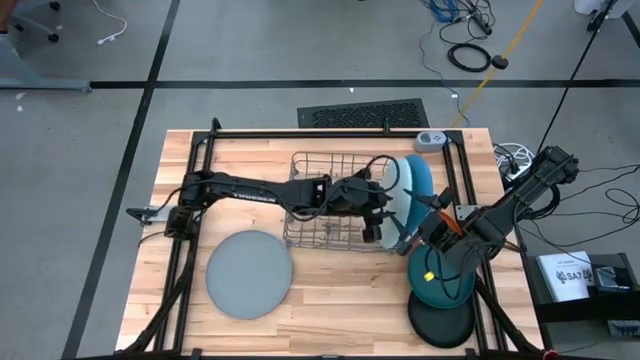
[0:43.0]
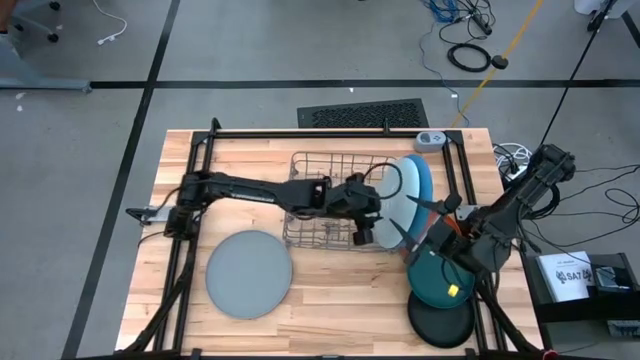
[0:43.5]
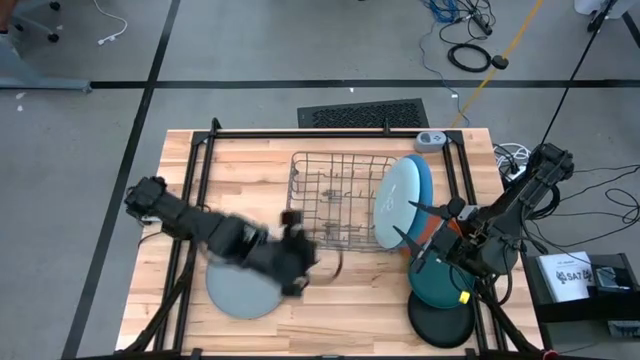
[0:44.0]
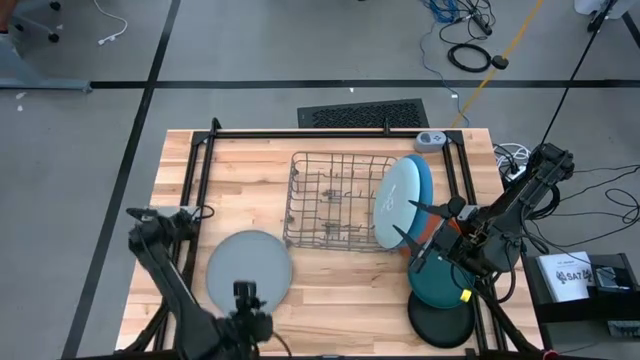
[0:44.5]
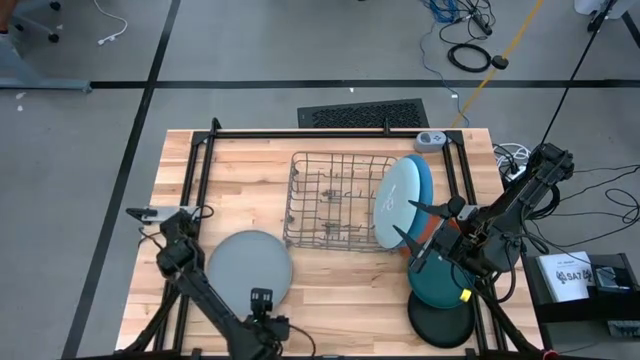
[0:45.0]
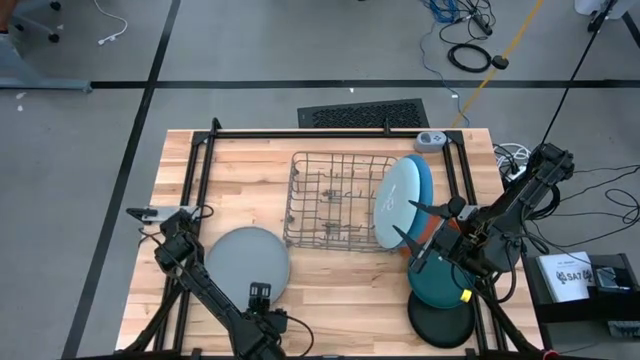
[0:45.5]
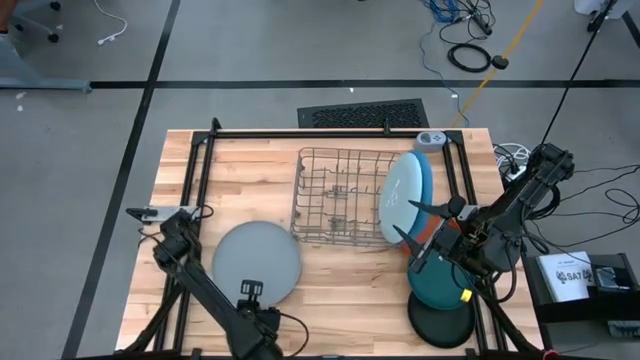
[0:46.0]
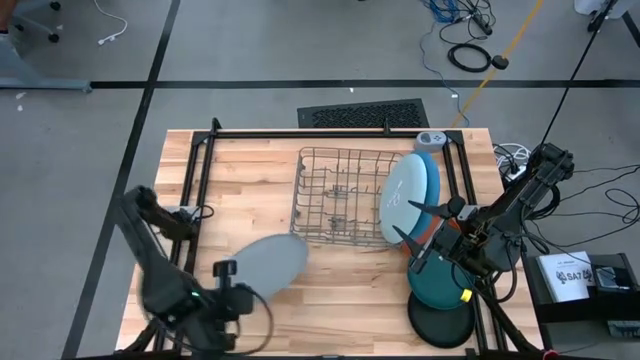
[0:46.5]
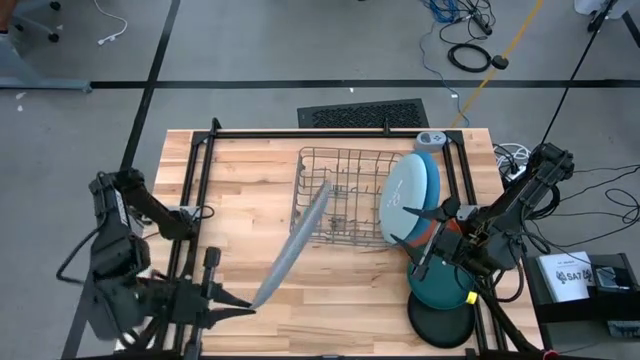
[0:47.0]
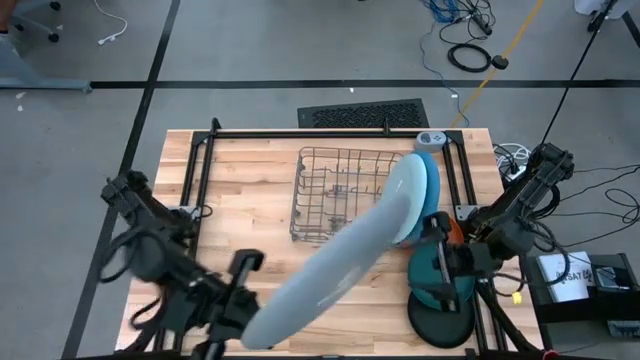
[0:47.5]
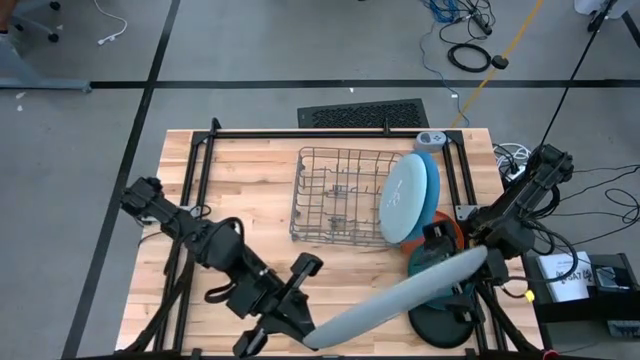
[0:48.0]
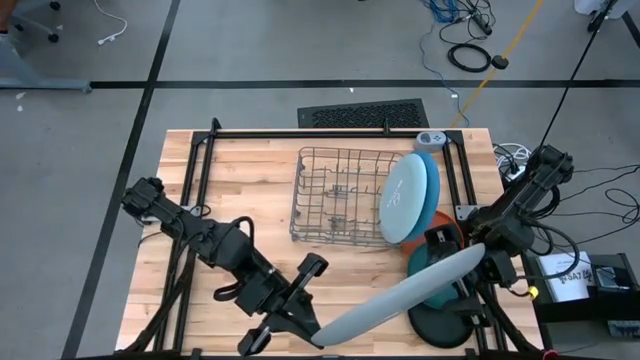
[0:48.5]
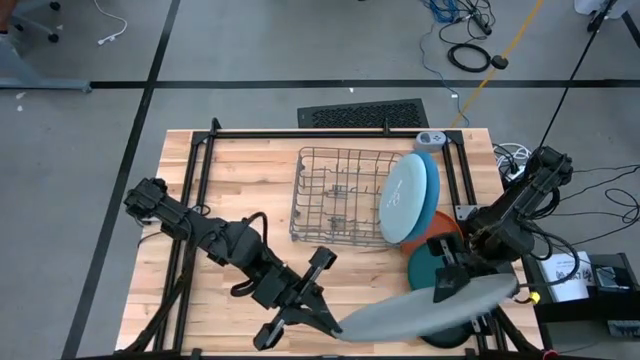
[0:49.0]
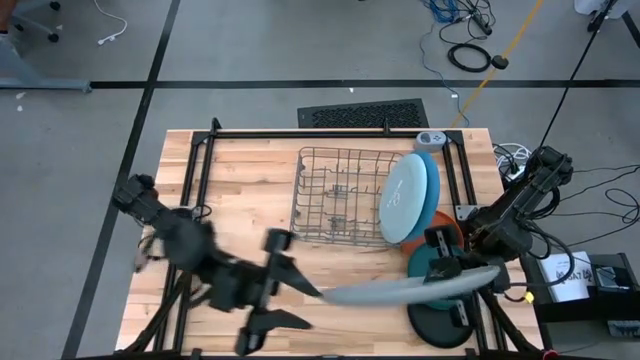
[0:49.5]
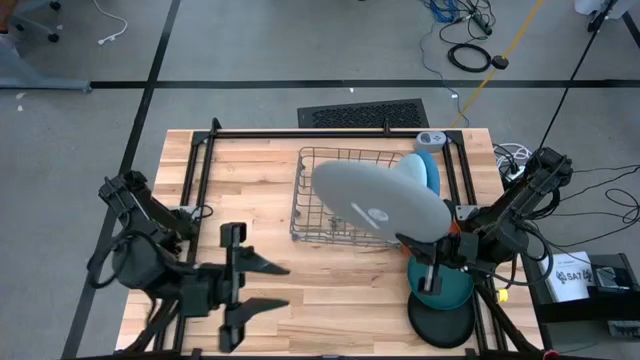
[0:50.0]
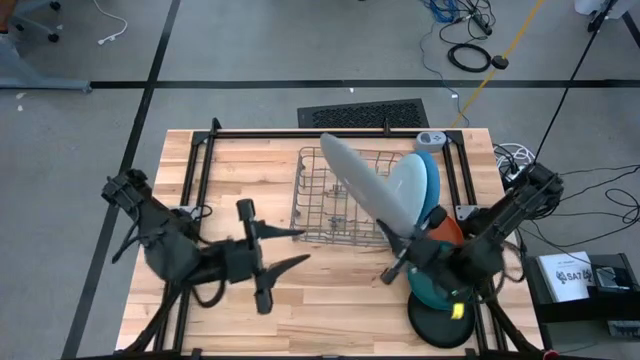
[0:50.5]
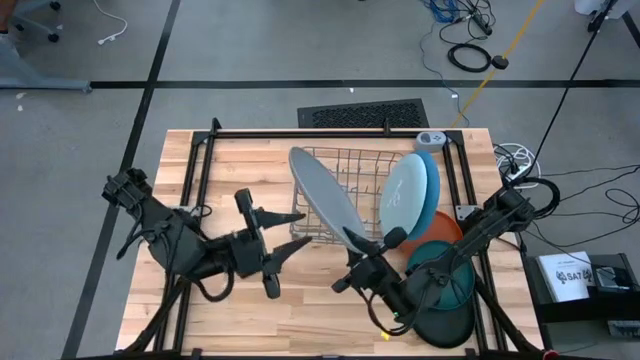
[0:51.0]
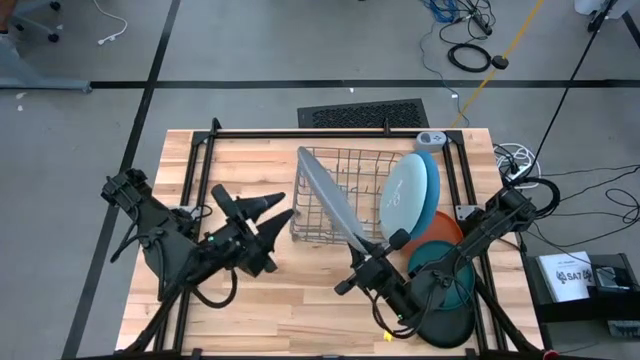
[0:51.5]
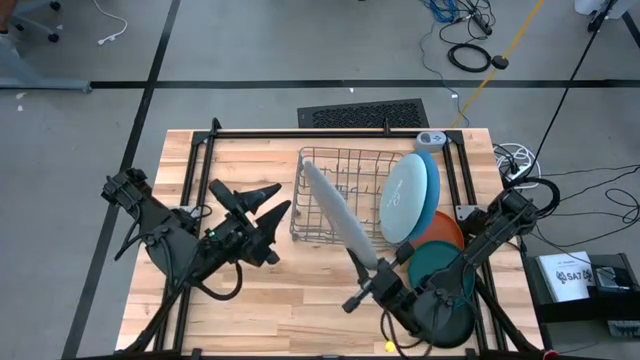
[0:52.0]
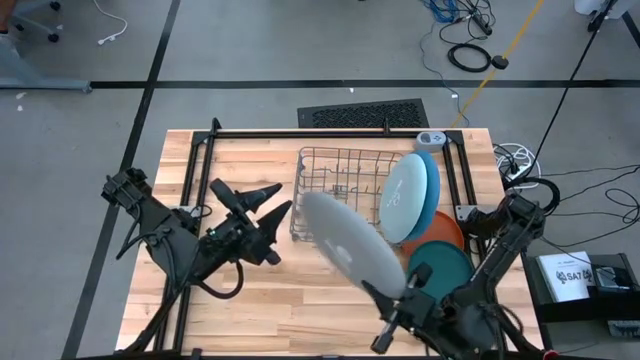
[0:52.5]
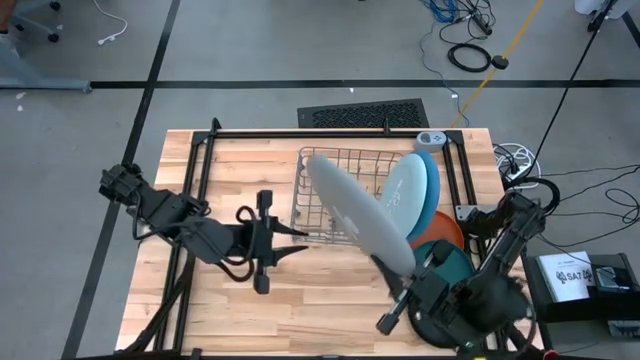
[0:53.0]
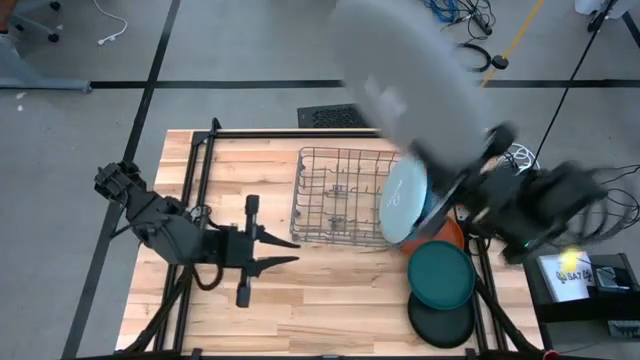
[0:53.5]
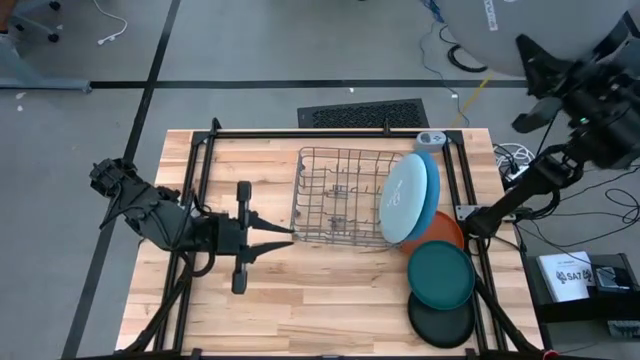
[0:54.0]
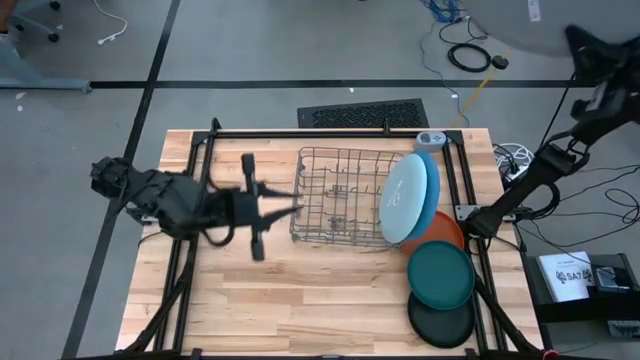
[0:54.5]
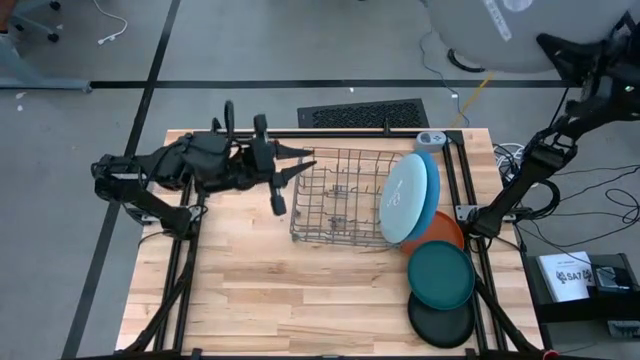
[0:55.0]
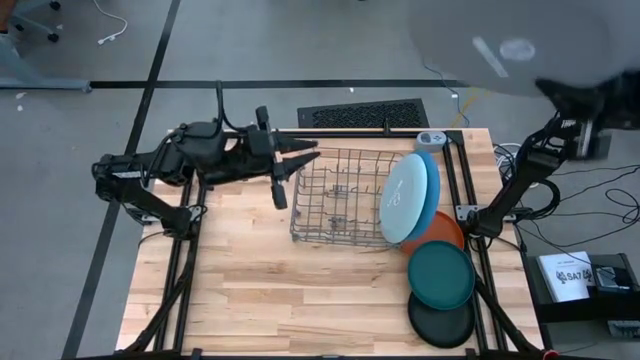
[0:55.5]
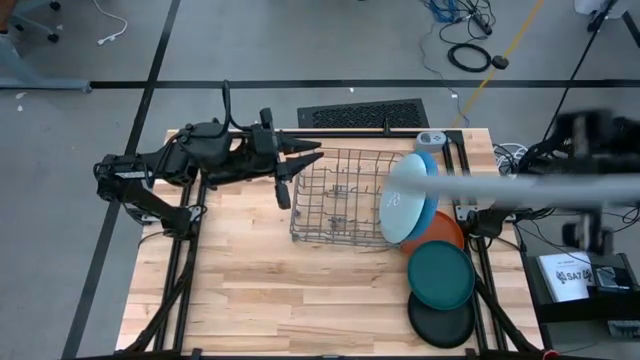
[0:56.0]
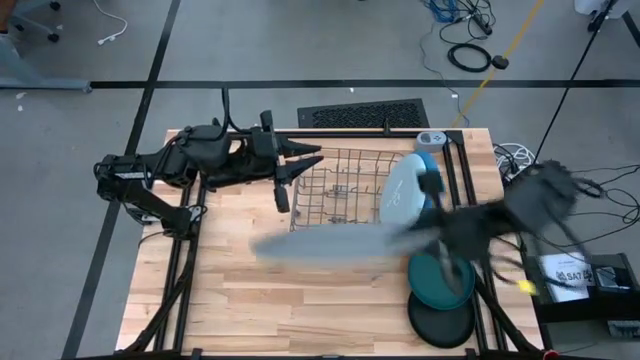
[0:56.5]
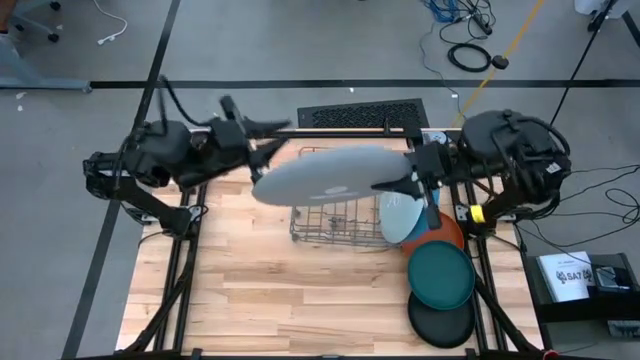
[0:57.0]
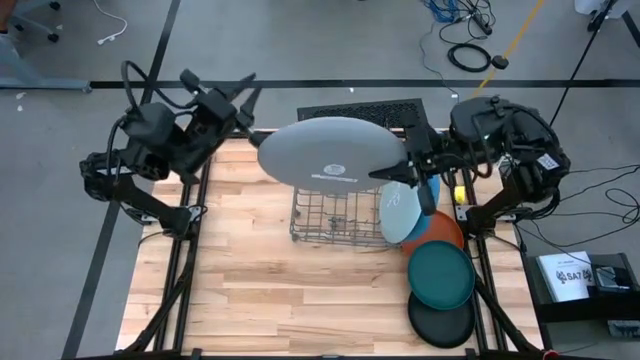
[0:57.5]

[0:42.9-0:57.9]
Task: Sort dishes
Put the gray plate into the dish rack

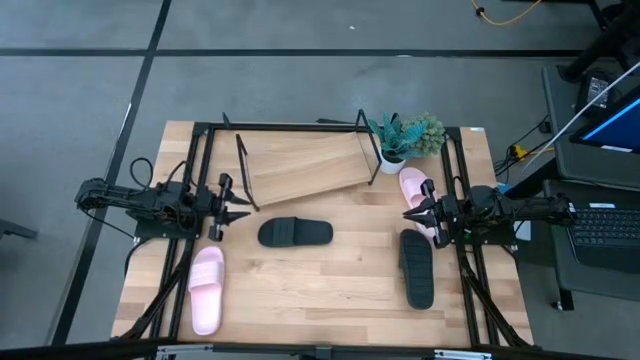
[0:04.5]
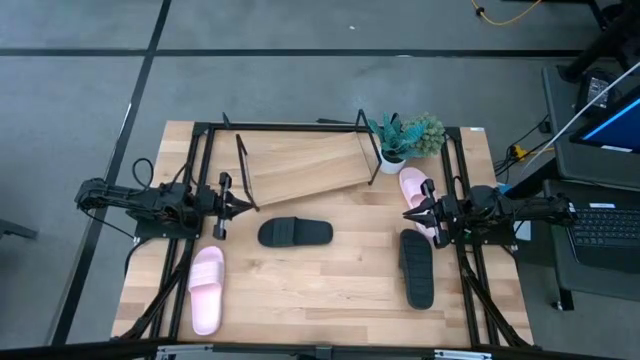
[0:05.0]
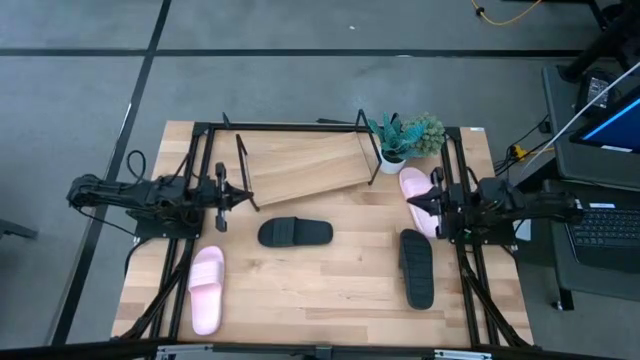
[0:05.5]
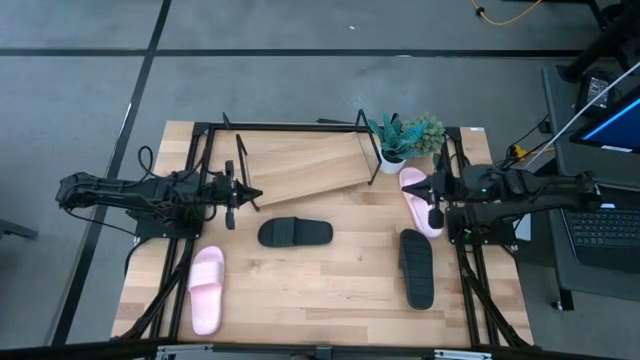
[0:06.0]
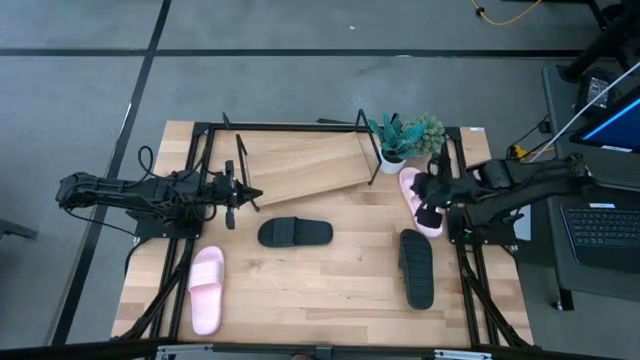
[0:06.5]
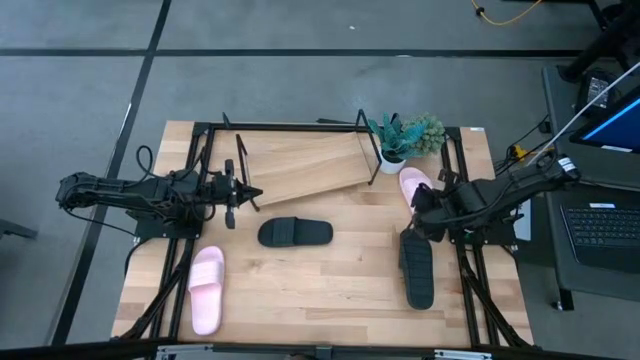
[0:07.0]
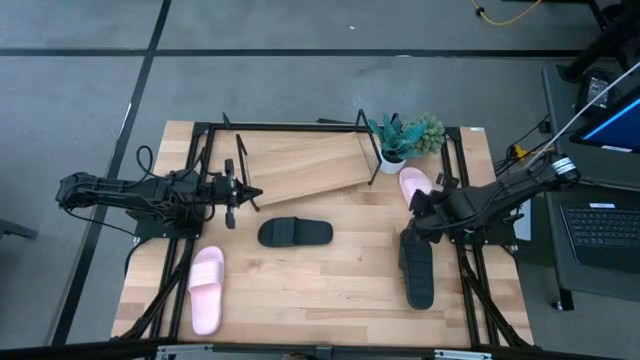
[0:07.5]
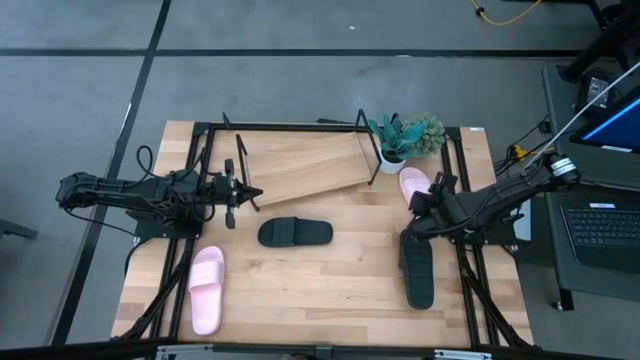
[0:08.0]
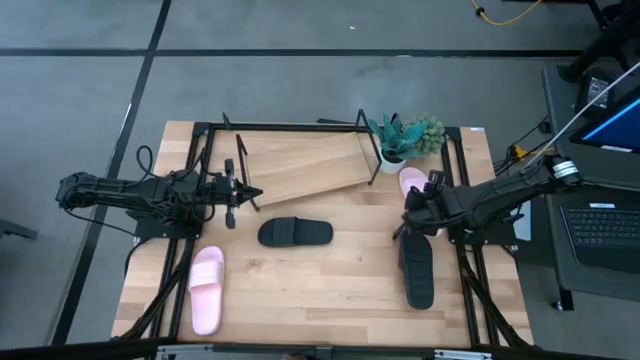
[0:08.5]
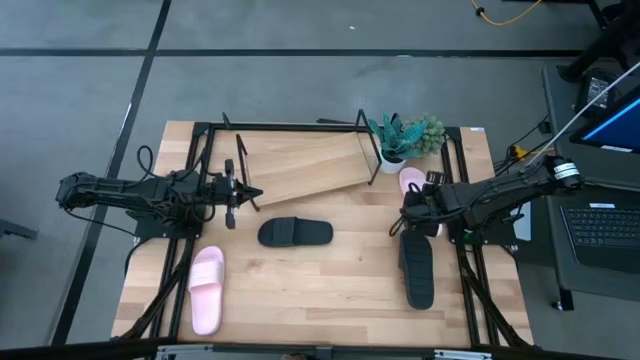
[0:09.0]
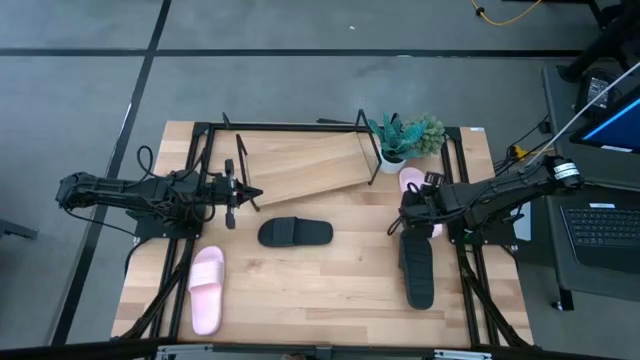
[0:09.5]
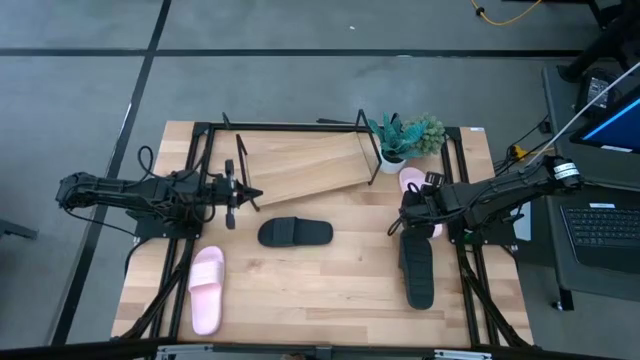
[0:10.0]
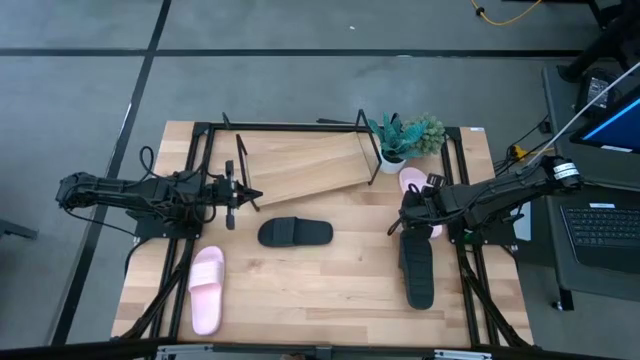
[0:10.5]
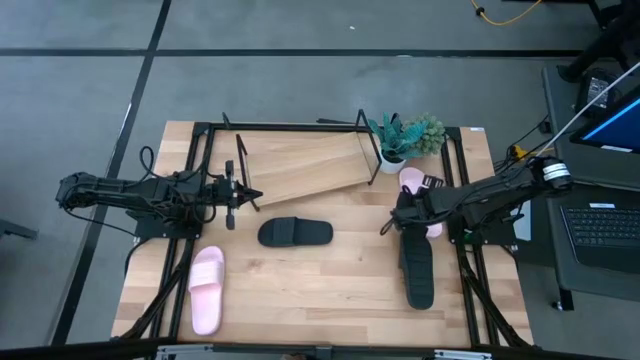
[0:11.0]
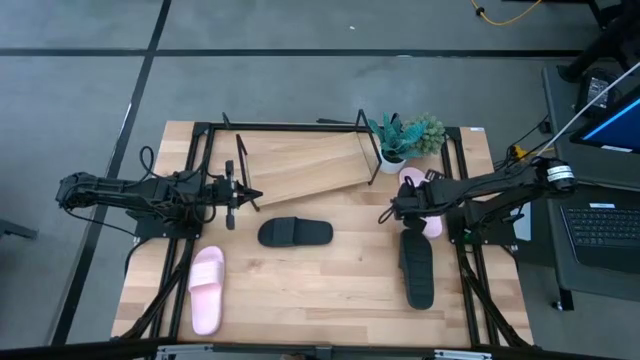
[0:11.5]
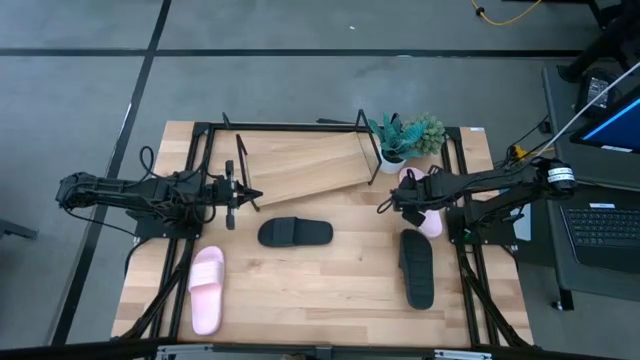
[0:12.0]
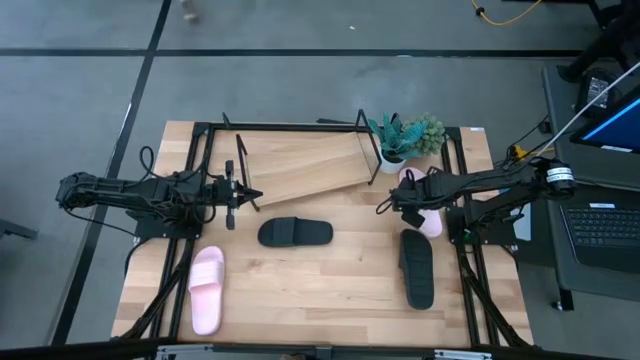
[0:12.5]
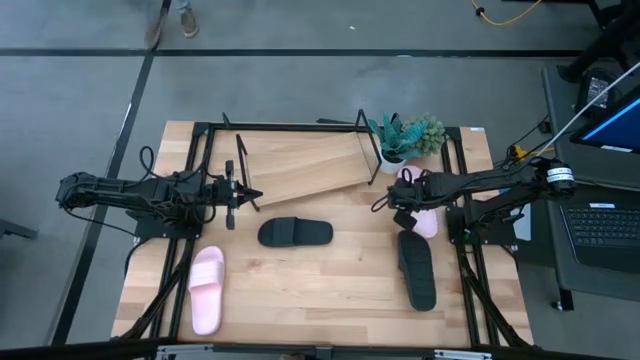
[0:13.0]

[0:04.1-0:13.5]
Task: Pick and place slides into the shelf
Put the top pink slide on the shelf
